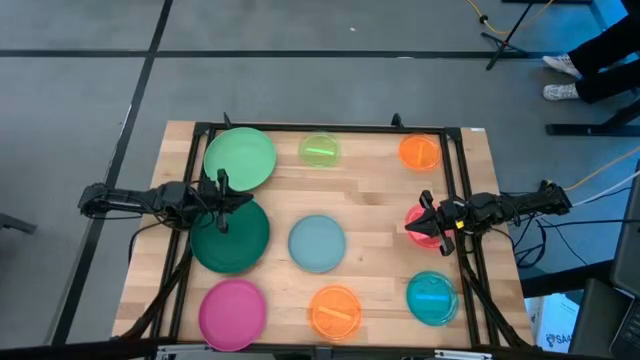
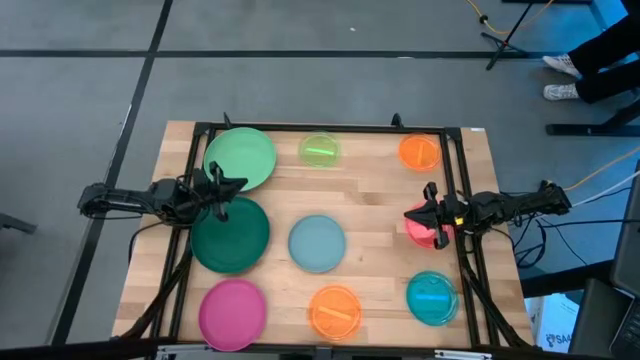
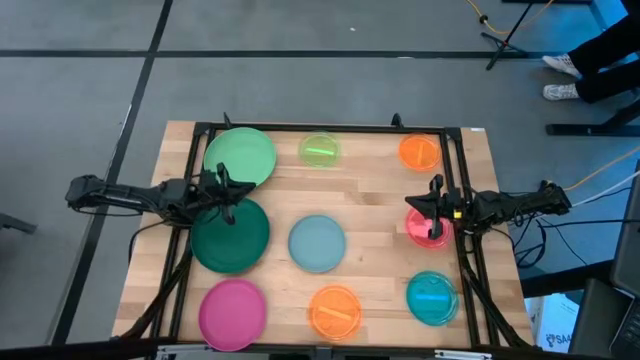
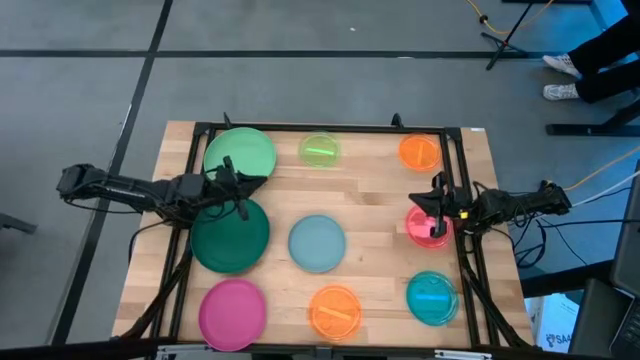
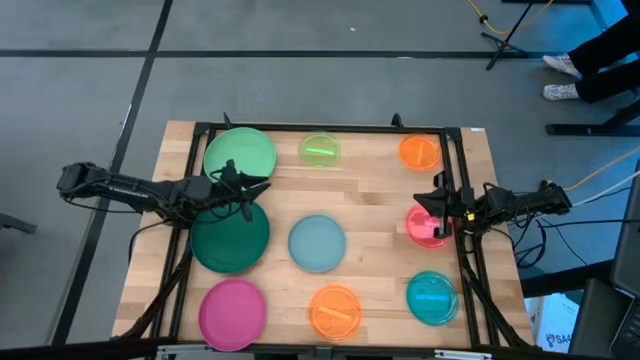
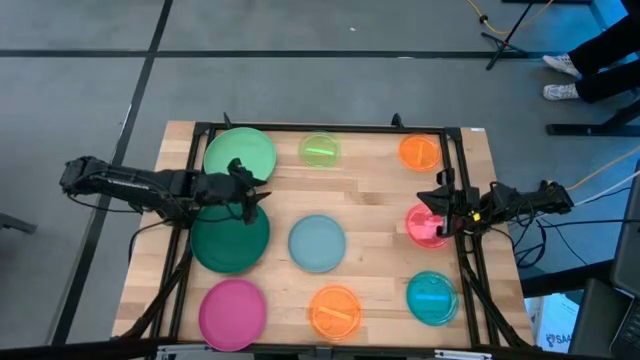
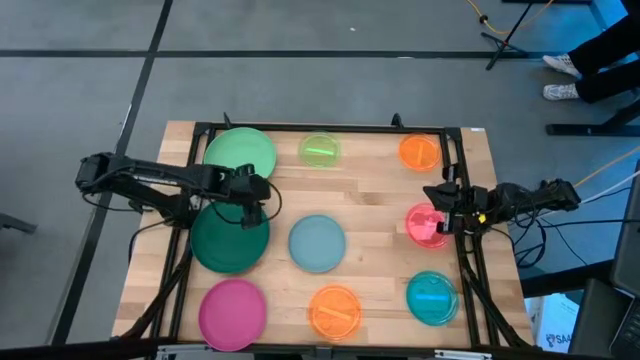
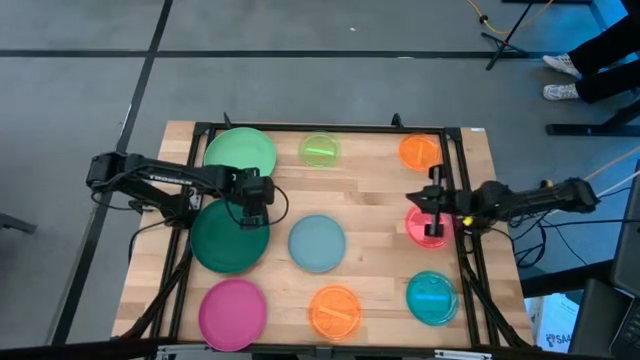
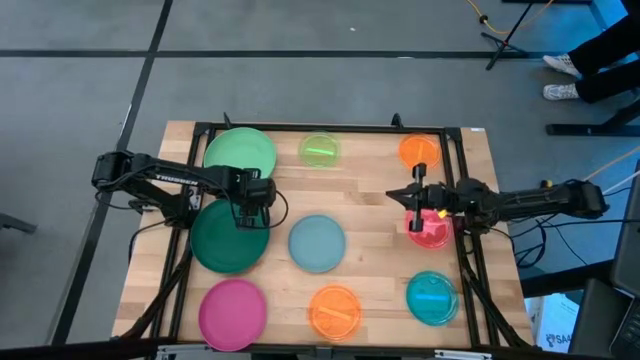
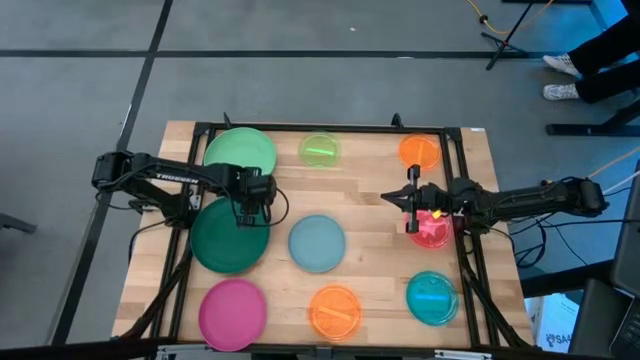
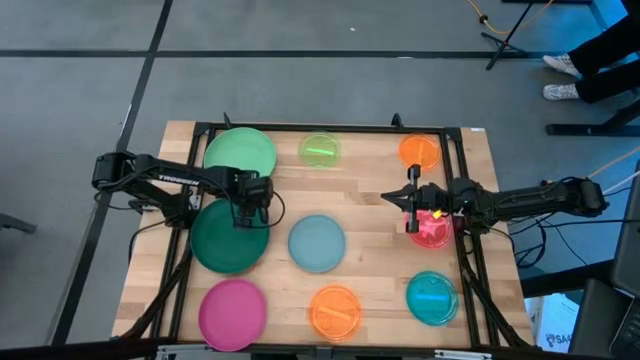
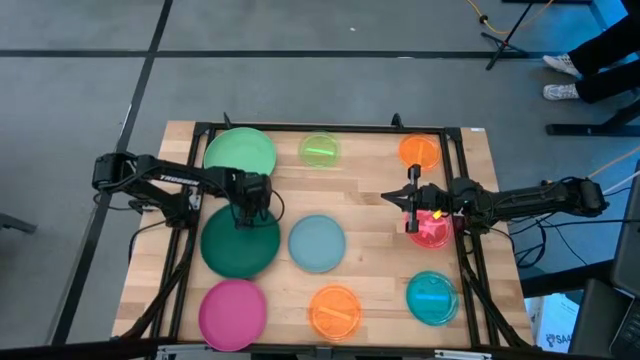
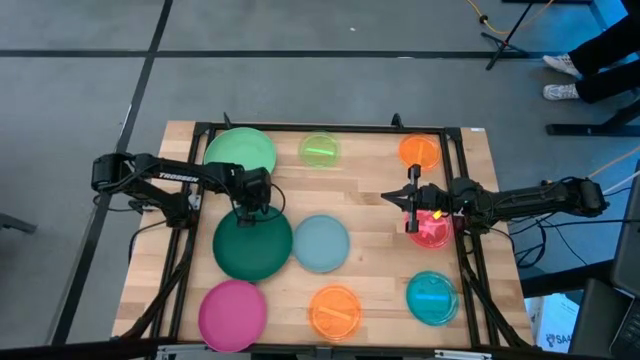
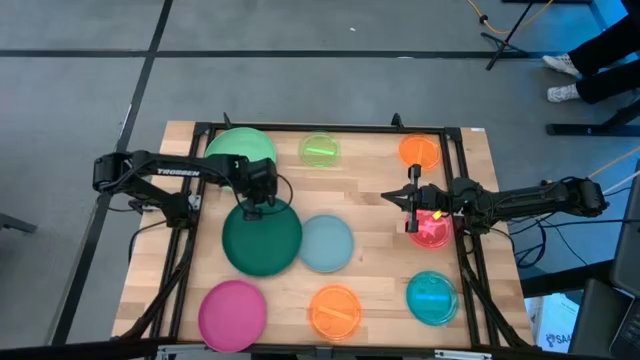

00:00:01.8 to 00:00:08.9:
Task: Stack plastic plates
Stack the dark green plate on the green plate

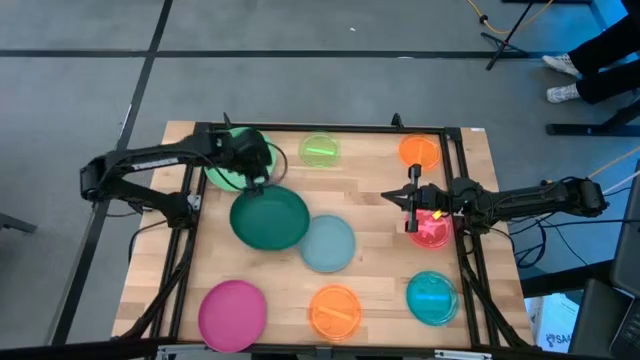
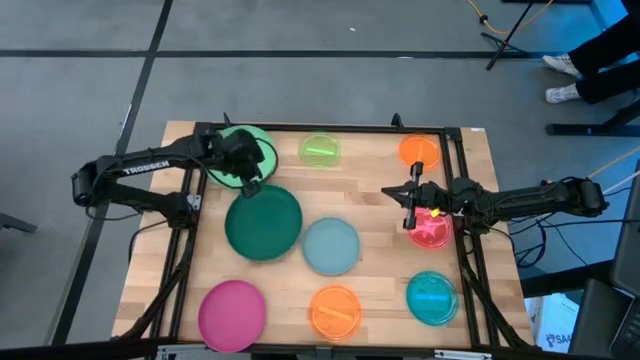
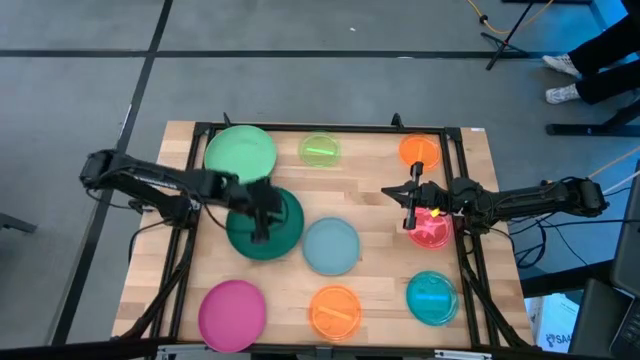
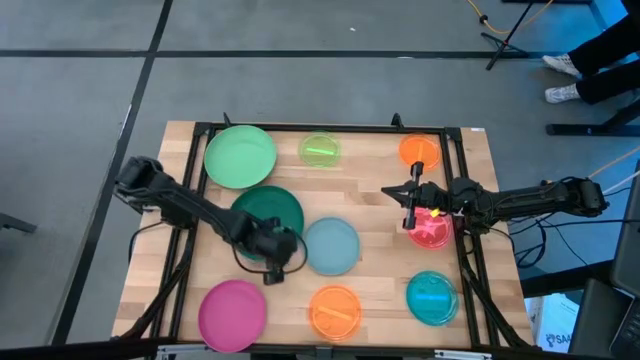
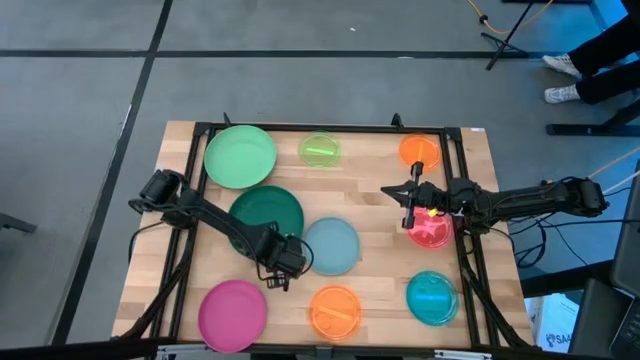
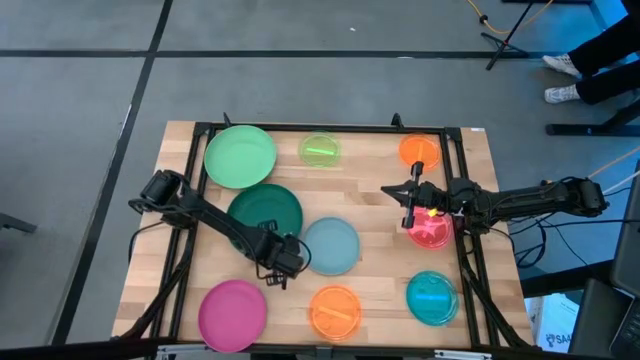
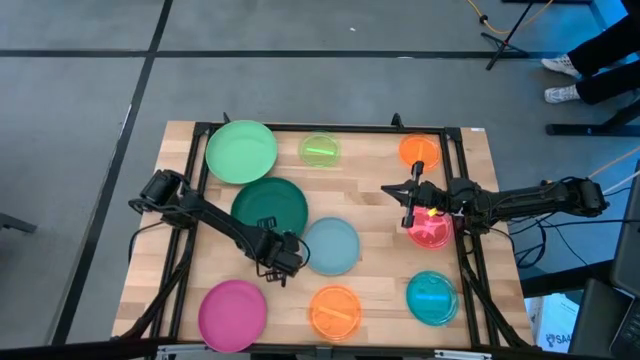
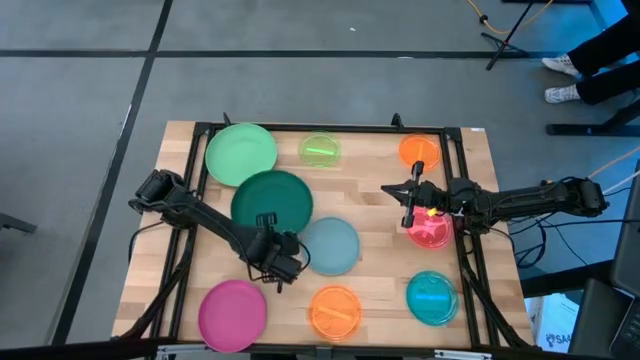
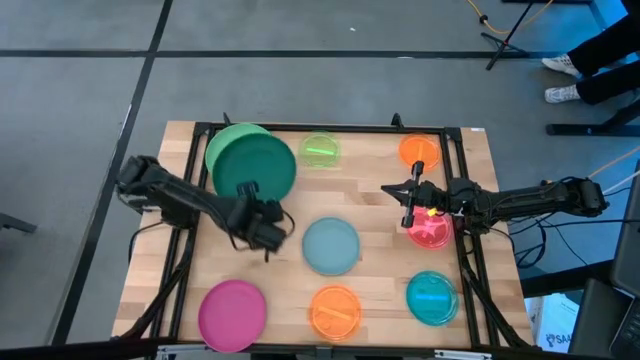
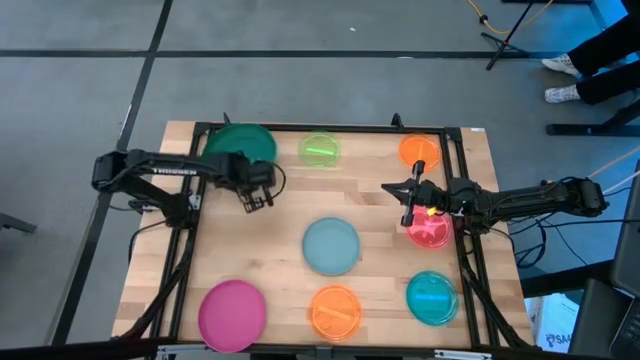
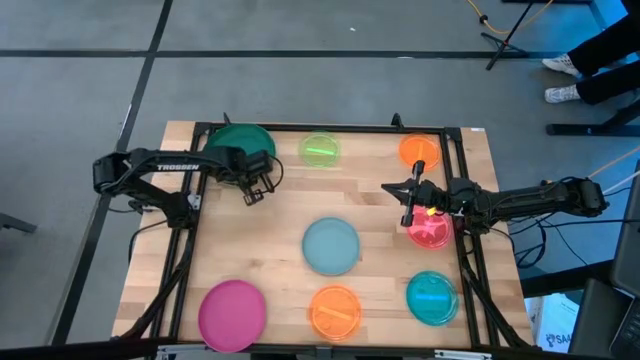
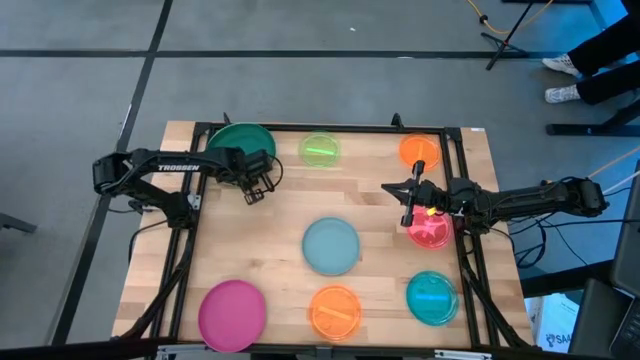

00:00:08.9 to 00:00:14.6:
Stack the dark green plate on the green plate

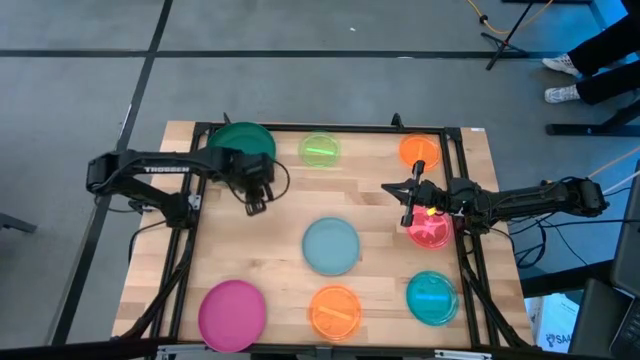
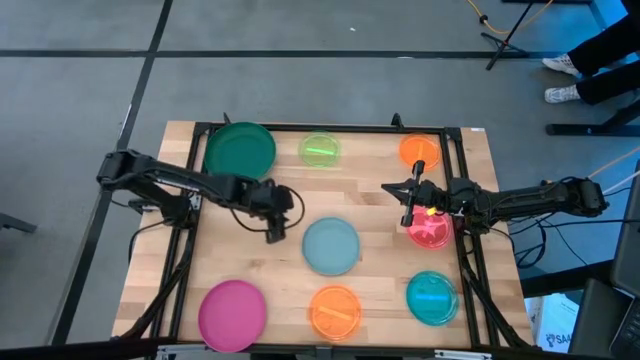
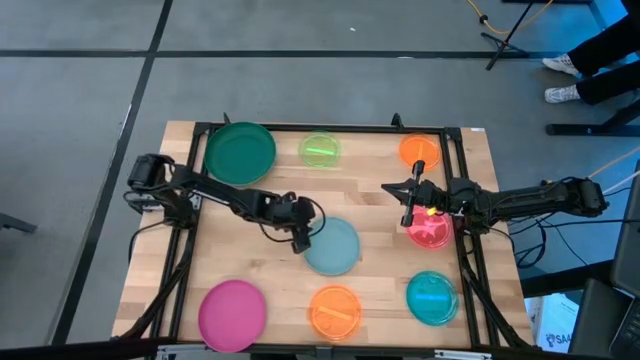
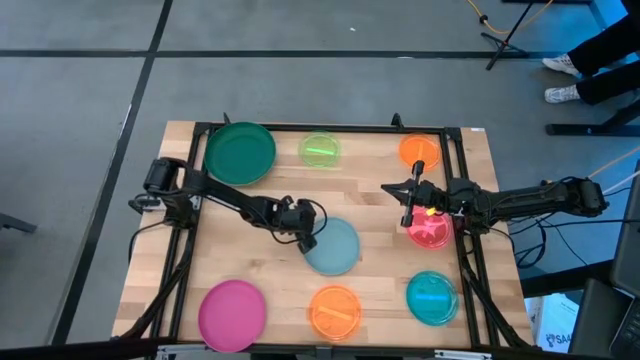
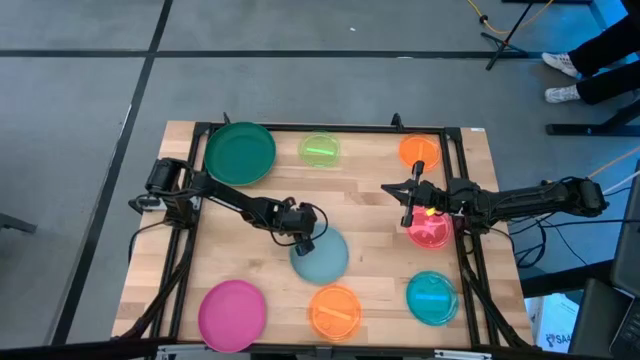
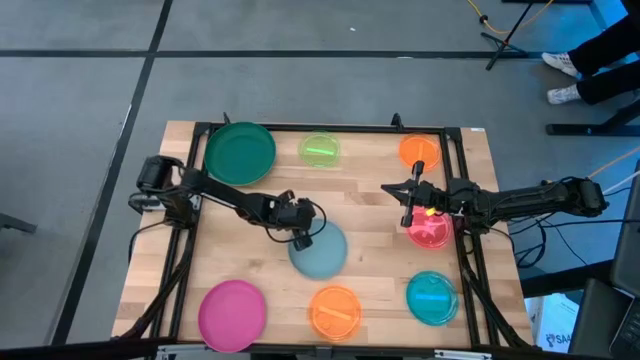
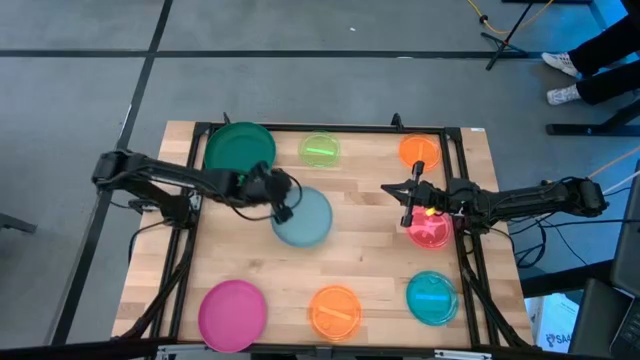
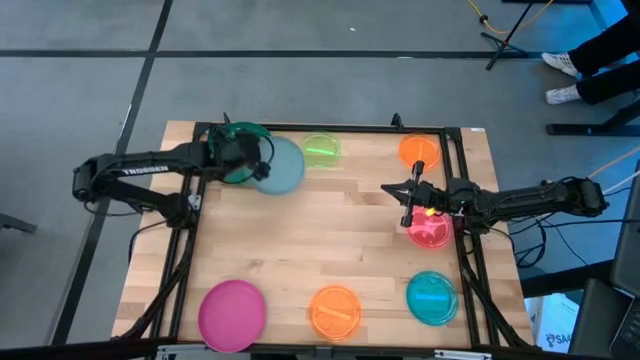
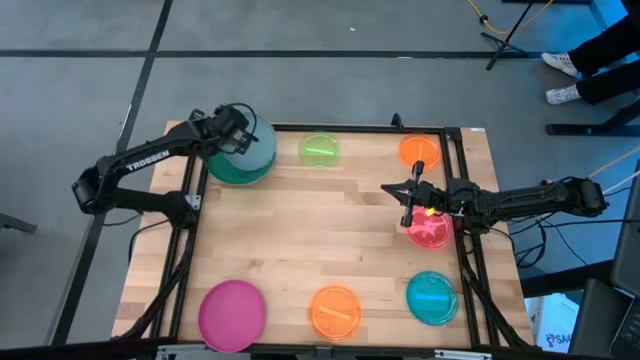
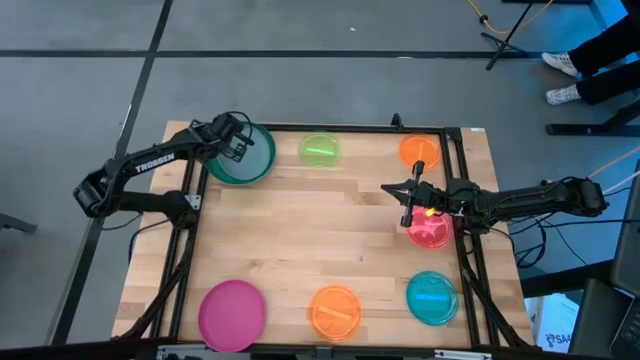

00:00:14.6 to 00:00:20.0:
Stack the blue plate on the dark green plate

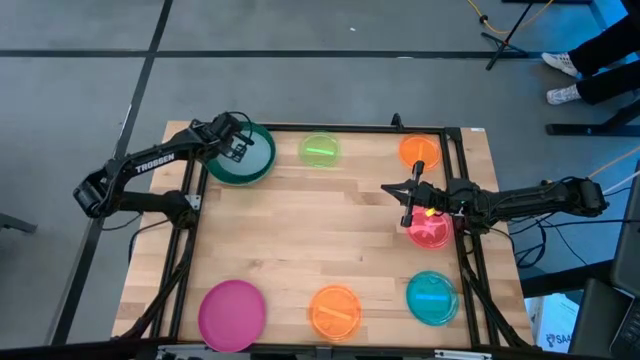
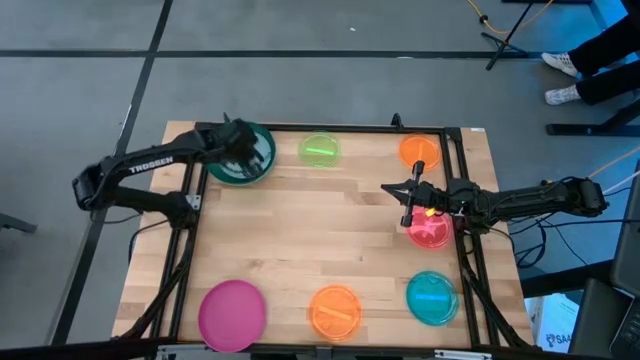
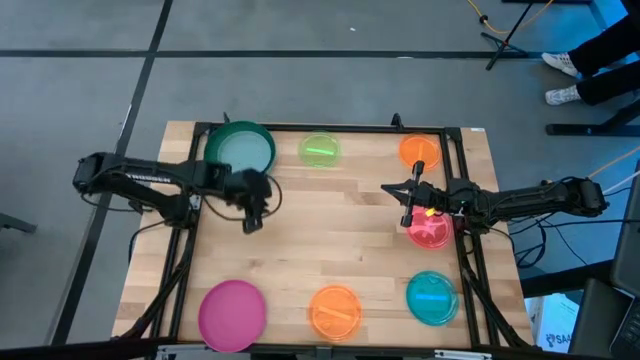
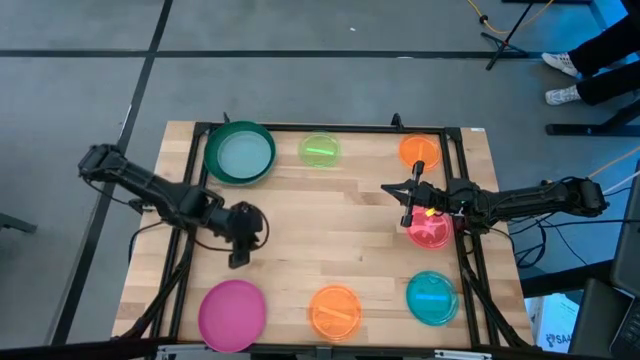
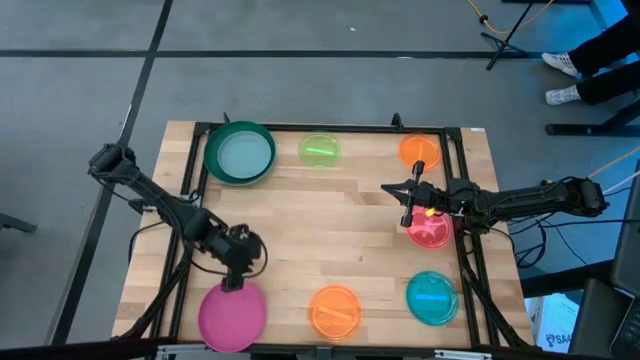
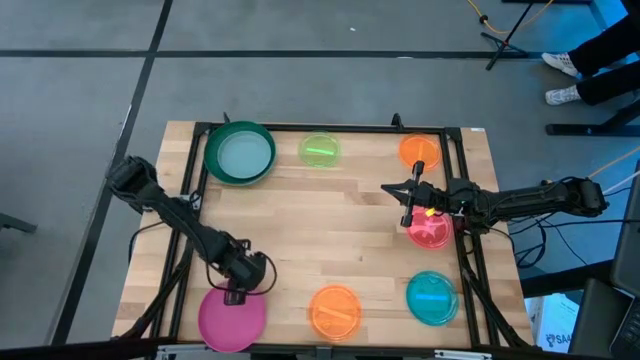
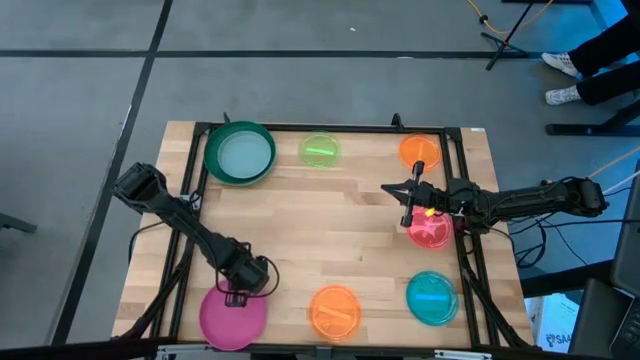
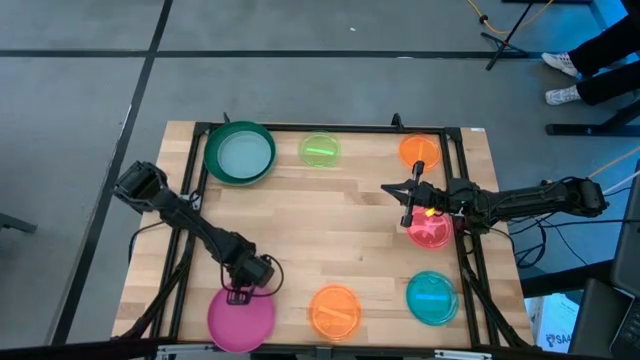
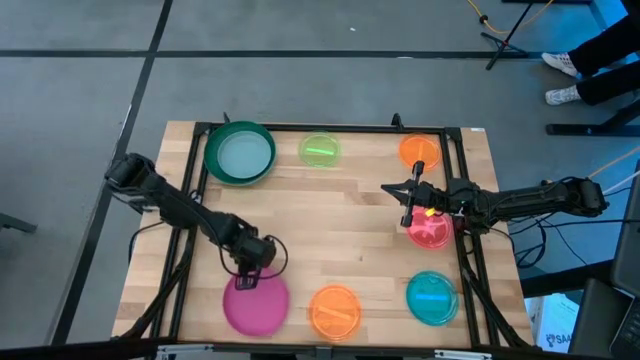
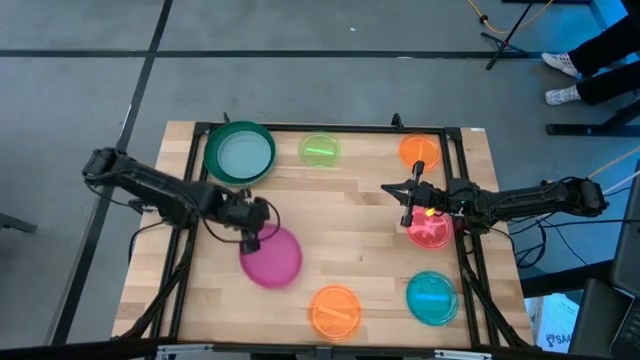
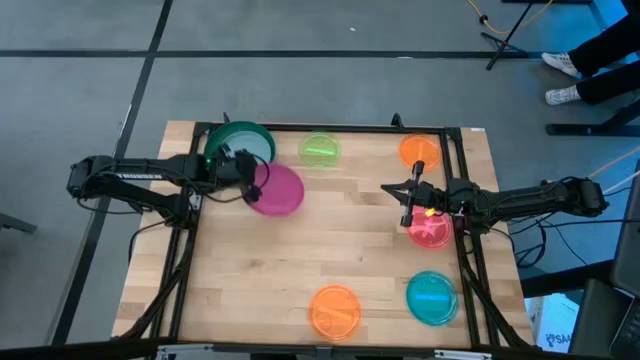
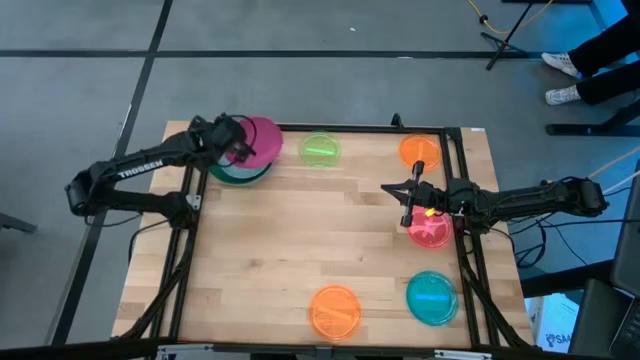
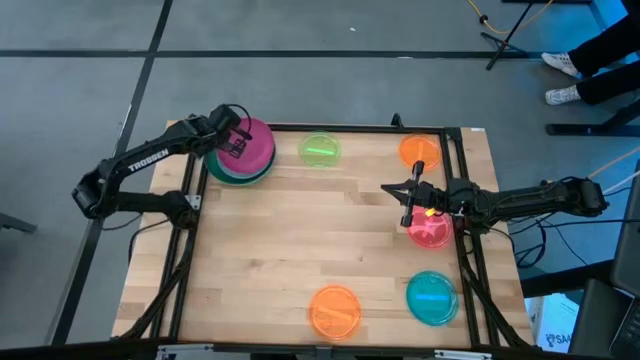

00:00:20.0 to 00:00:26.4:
Stack the pink plate on the blue plate
